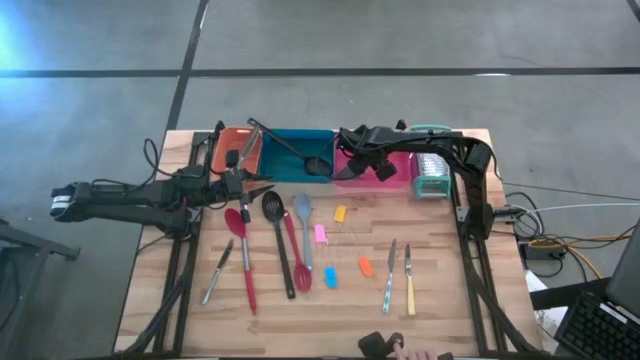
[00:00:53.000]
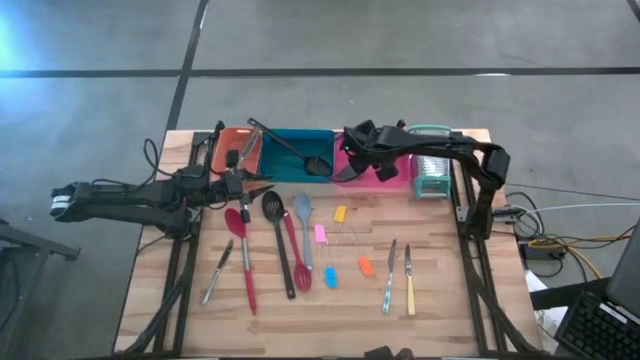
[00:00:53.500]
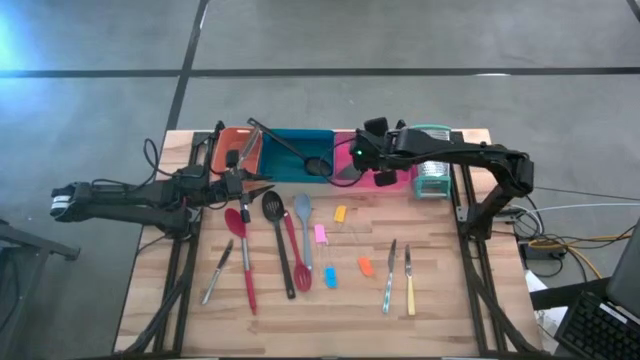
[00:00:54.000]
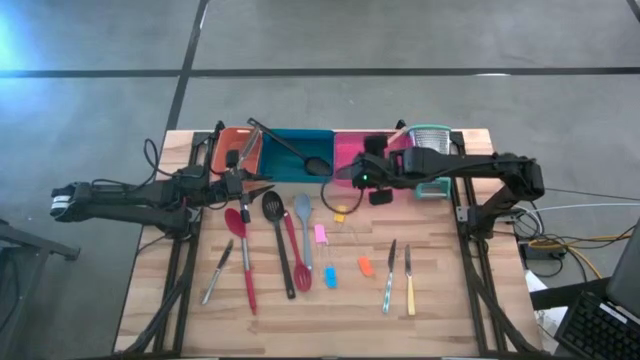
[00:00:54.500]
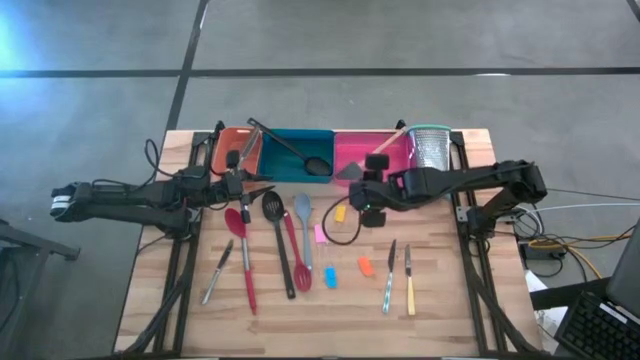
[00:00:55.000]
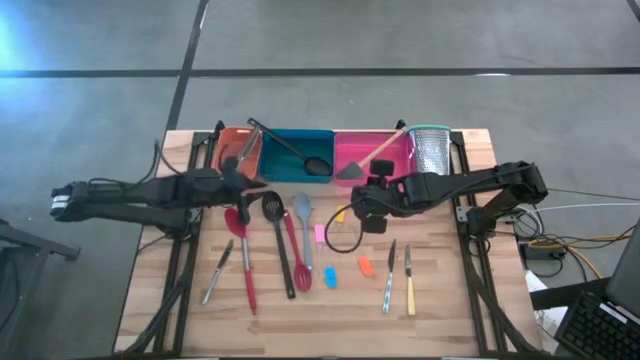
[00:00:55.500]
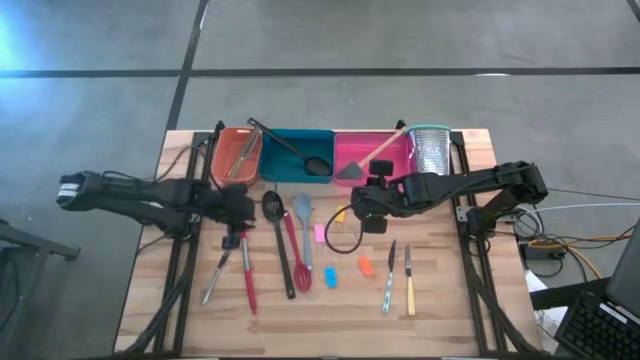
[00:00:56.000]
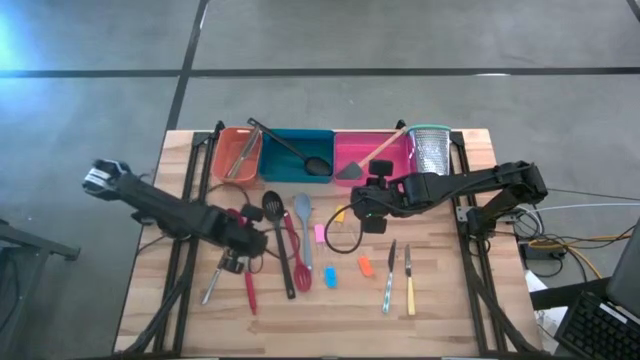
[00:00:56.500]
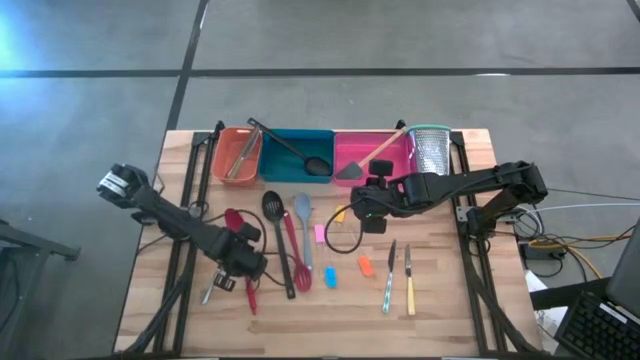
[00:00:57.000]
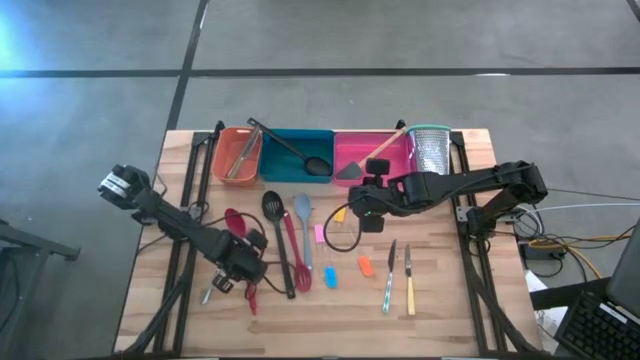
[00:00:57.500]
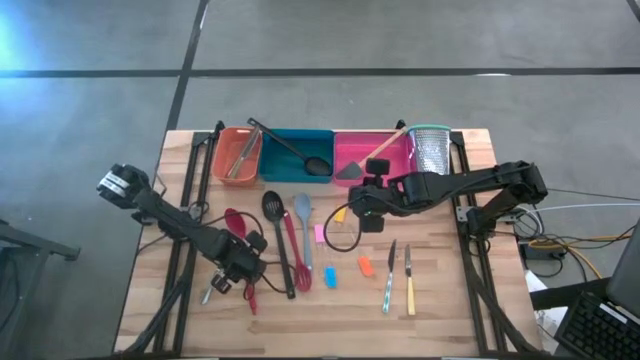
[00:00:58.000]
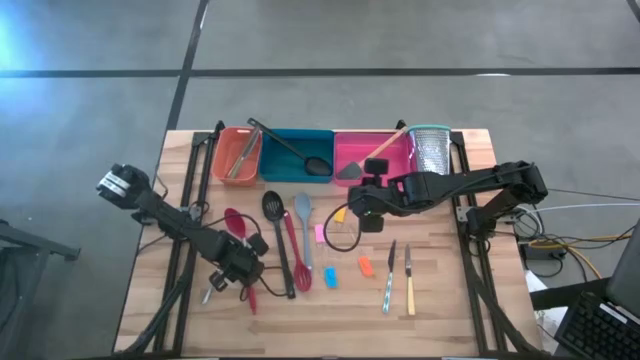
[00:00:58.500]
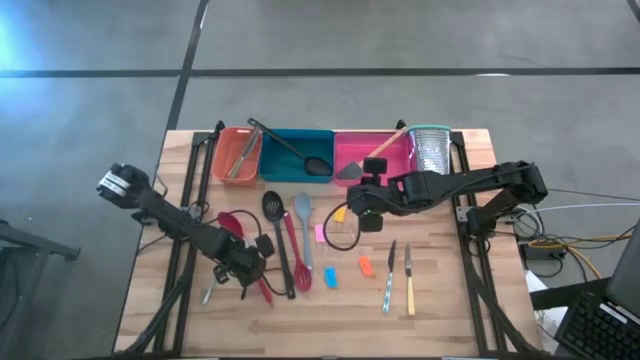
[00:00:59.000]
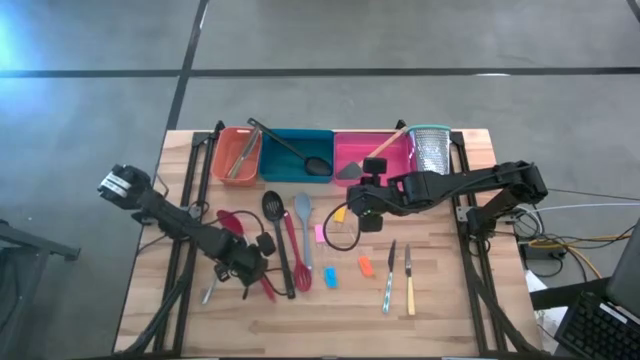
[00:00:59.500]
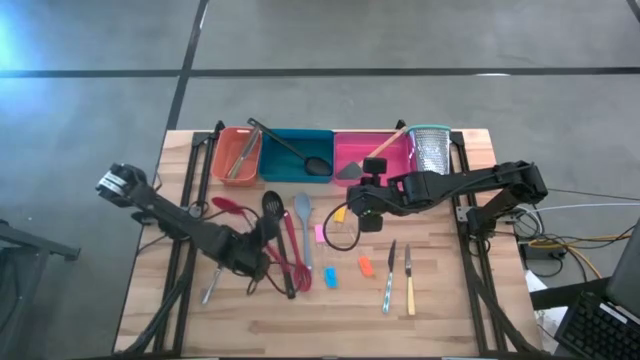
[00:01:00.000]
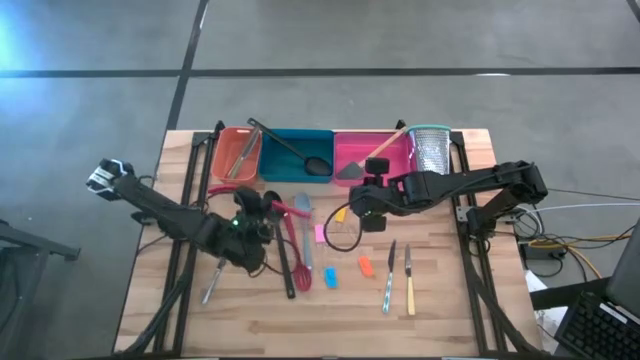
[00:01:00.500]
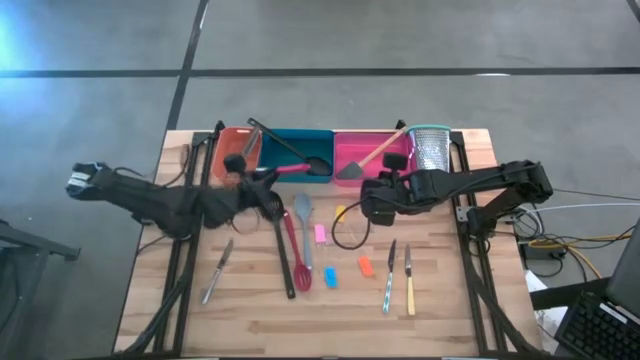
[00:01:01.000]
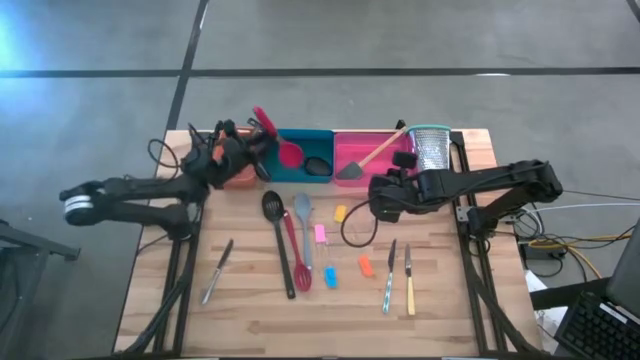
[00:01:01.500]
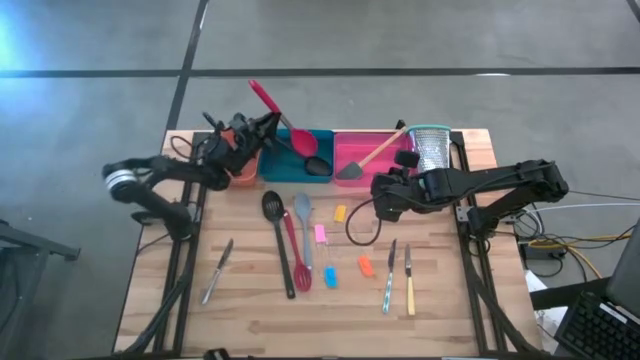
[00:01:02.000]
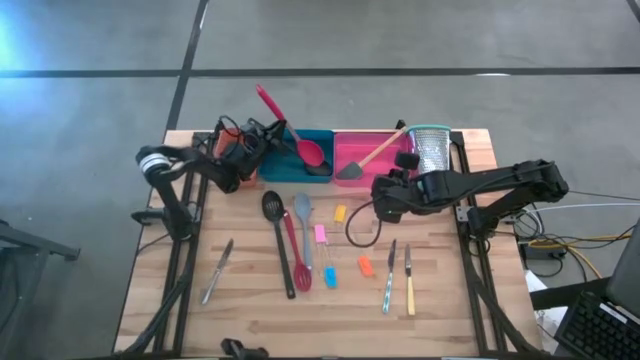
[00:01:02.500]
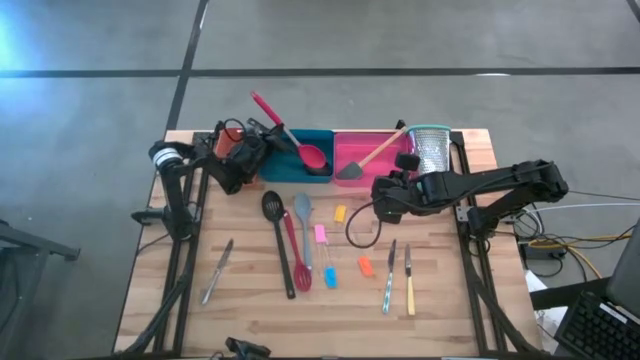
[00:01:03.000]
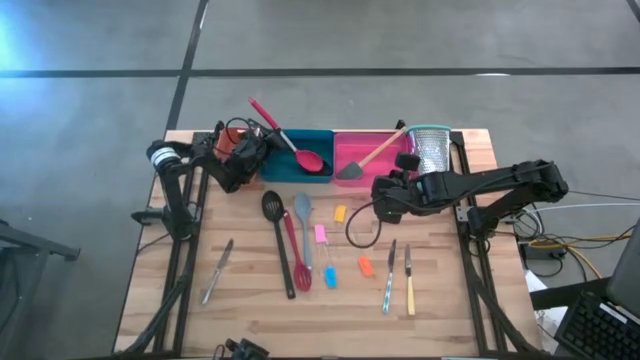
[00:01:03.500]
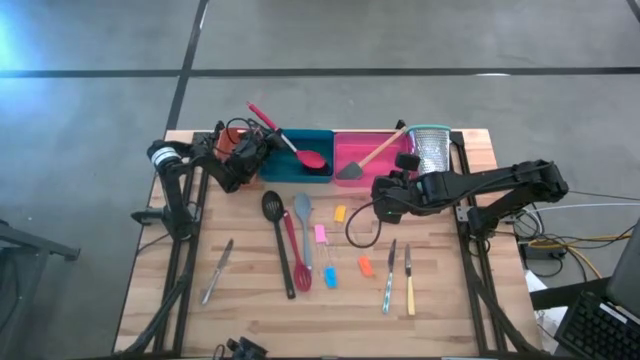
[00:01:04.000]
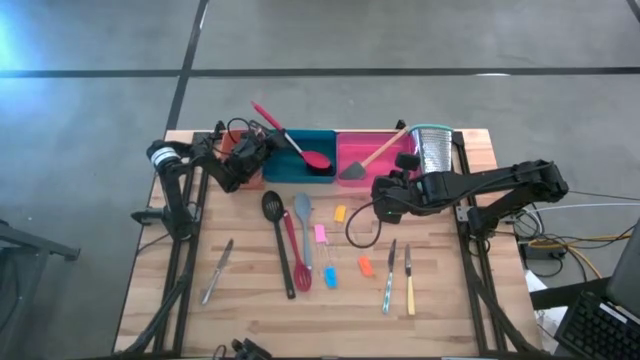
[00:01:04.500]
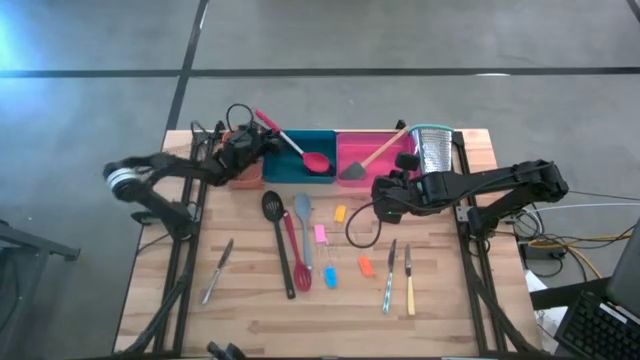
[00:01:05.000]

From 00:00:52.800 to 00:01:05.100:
Task: Pick & Place Kitchen Items
Put the red serving spoon into the blue bin

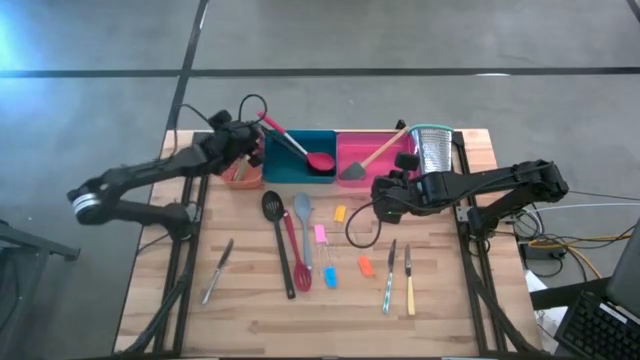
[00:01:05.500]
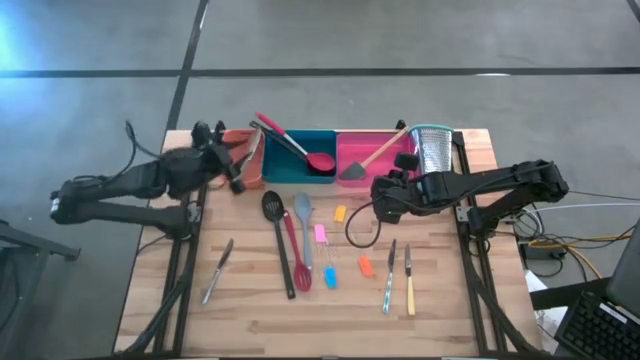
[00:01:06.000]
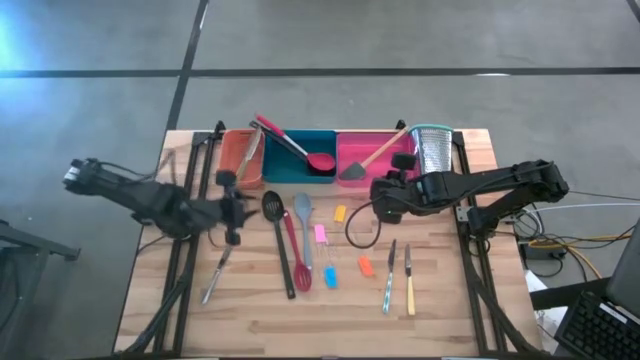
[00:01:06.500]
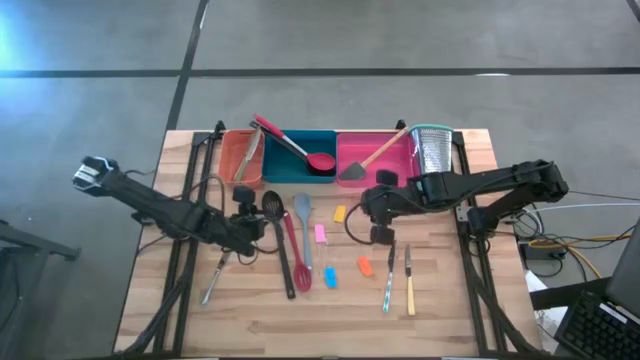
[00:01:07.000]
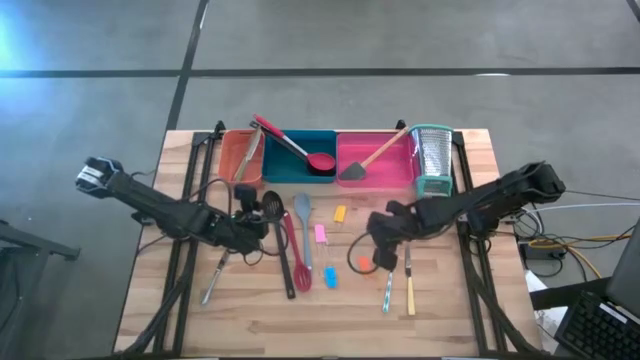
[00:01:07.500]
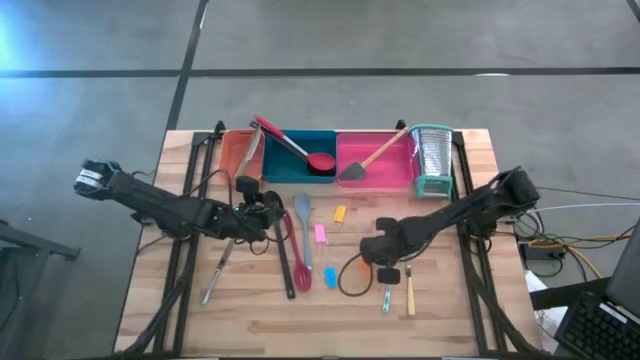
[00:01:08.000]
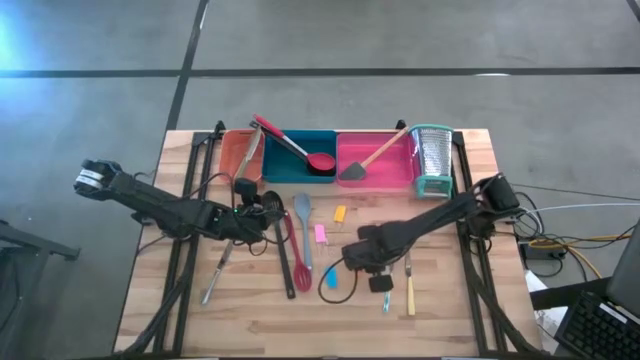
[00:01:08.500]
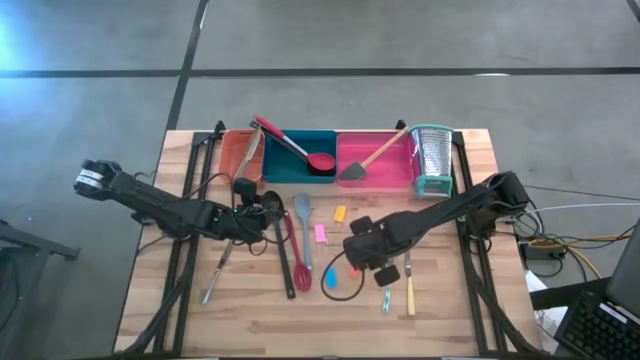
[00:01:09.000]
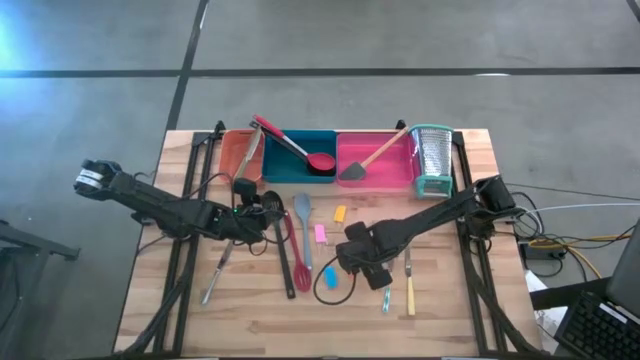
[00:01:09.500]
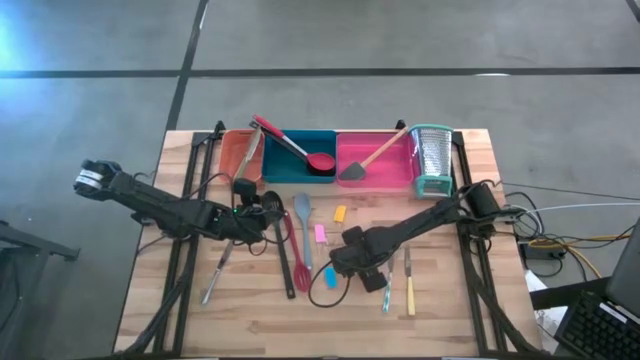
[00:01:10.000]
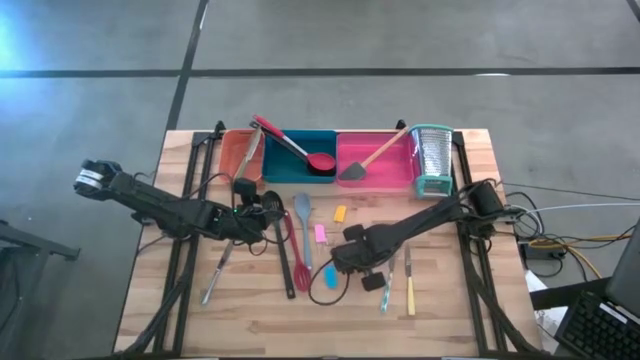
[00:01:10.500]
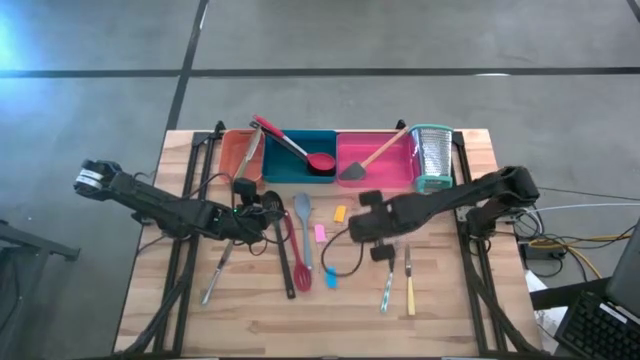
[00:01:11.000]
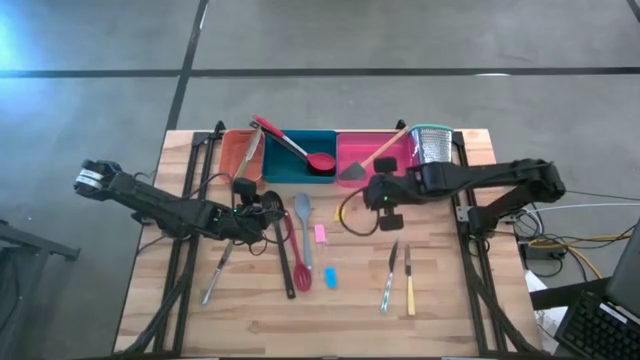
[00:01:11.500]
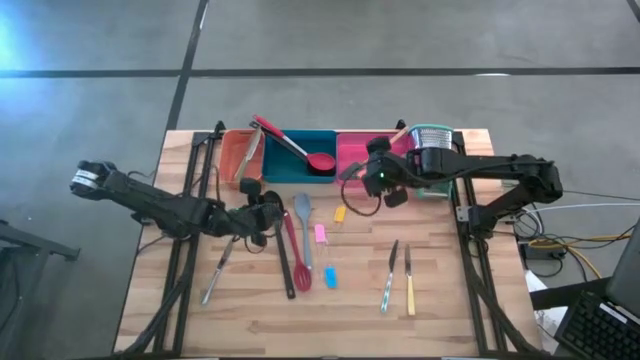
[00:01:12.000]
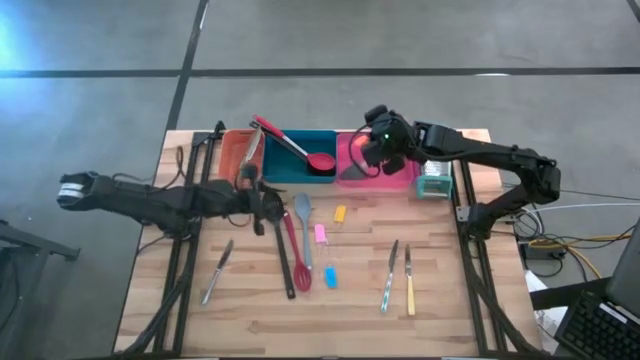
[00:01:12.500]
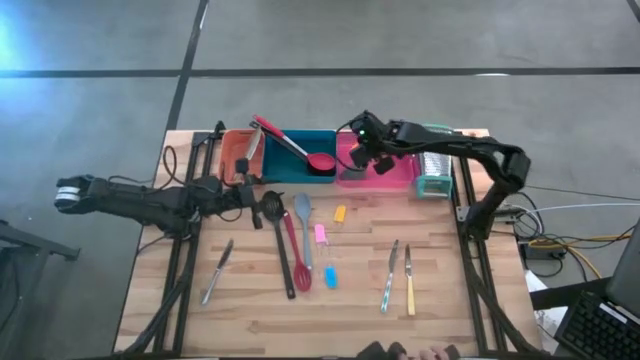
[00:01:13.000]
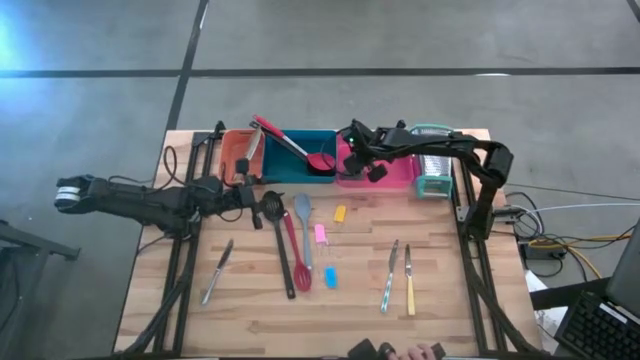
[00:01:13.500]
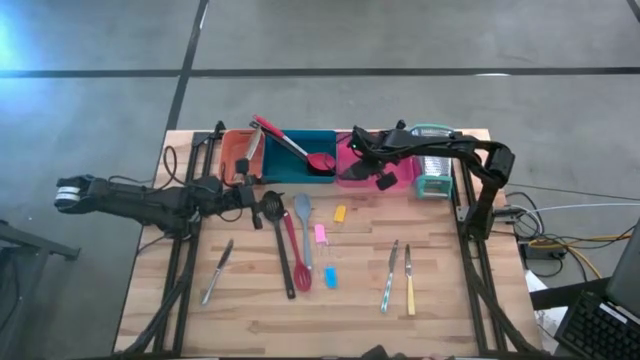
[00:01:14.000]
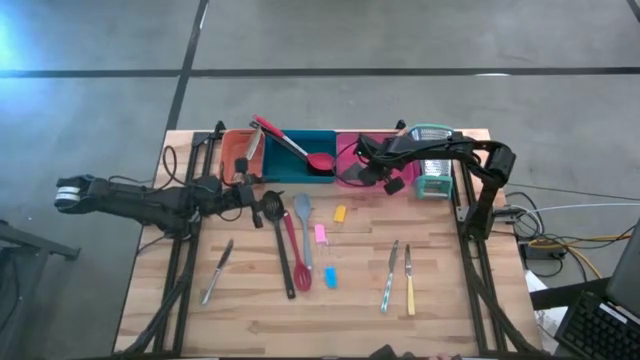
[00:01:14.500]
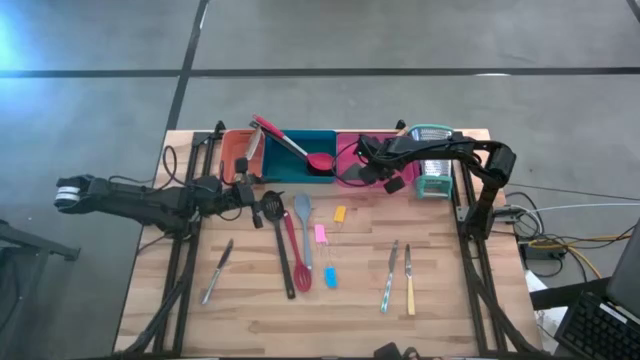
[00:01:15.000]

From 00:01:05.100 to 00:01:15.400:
Put the orange spatula into the red bin
